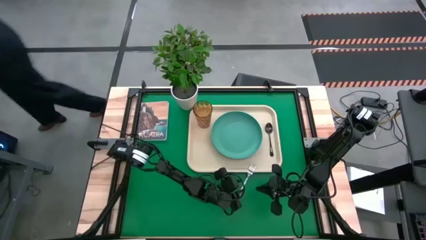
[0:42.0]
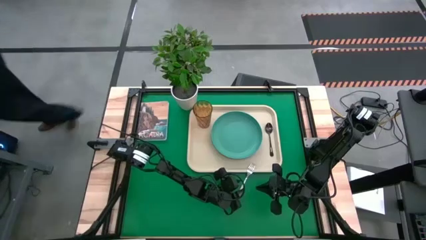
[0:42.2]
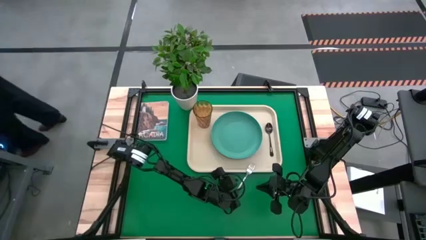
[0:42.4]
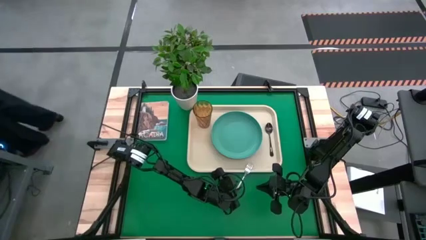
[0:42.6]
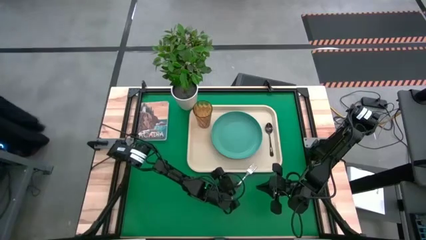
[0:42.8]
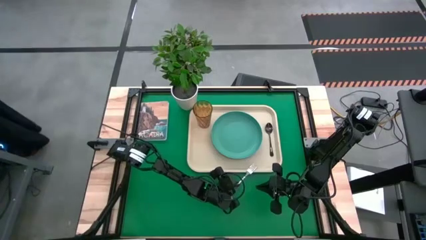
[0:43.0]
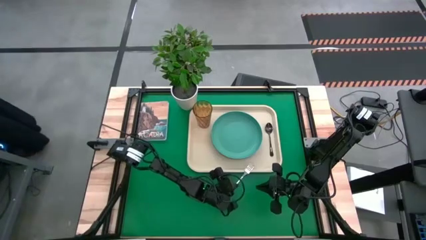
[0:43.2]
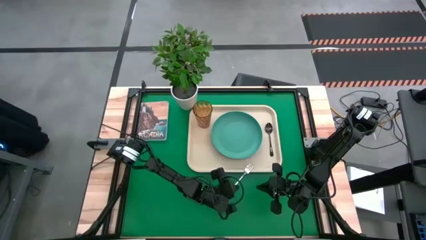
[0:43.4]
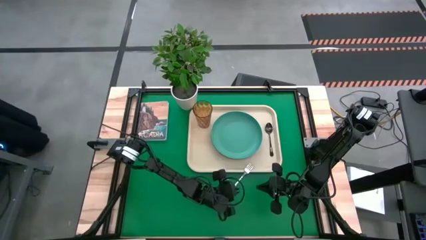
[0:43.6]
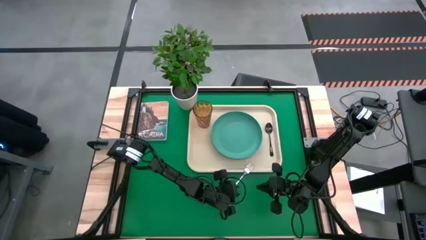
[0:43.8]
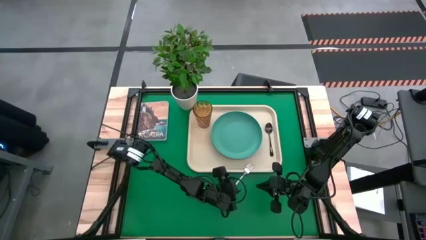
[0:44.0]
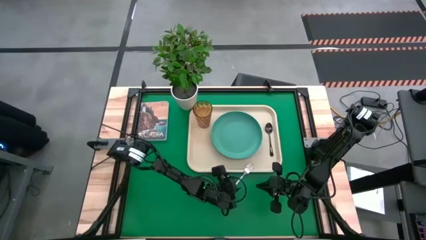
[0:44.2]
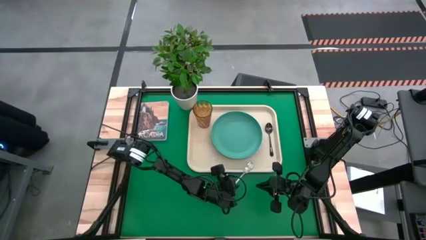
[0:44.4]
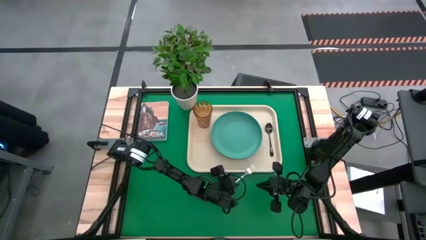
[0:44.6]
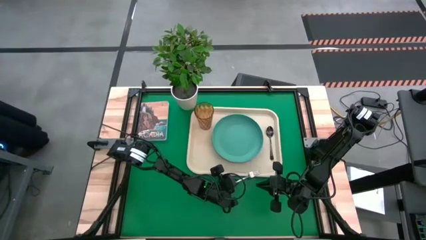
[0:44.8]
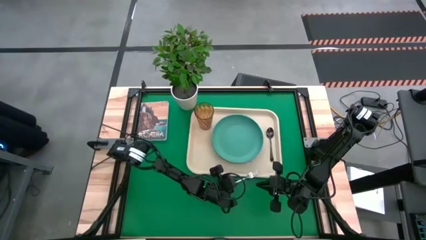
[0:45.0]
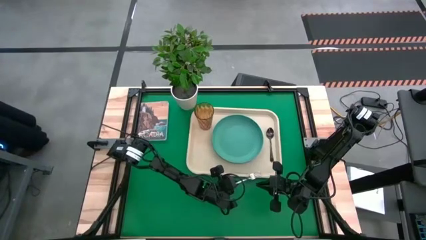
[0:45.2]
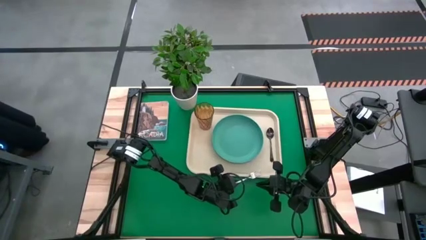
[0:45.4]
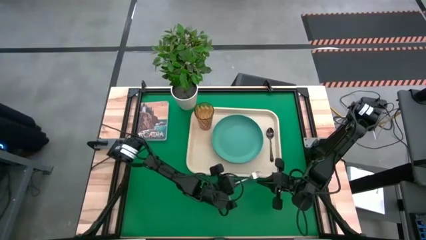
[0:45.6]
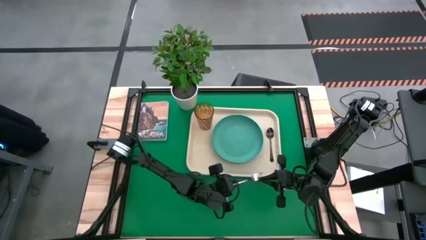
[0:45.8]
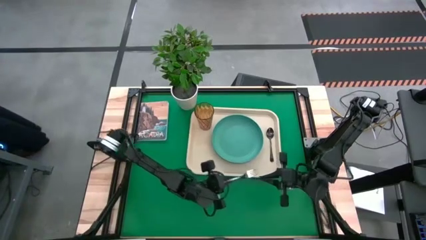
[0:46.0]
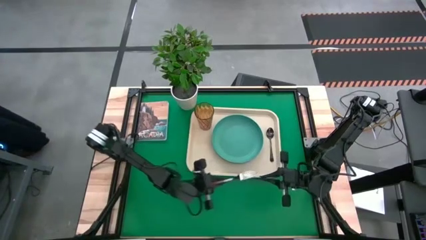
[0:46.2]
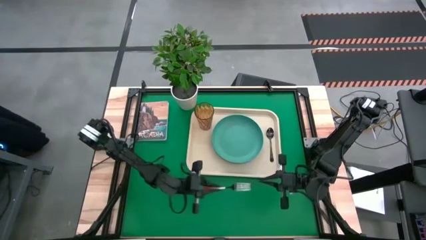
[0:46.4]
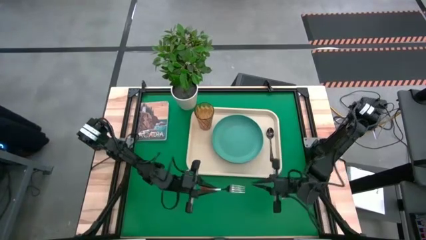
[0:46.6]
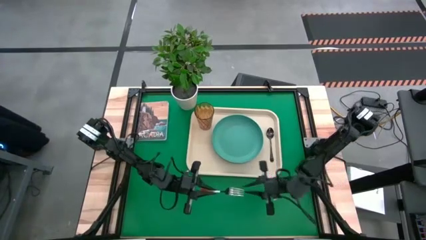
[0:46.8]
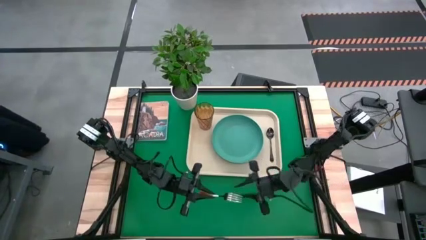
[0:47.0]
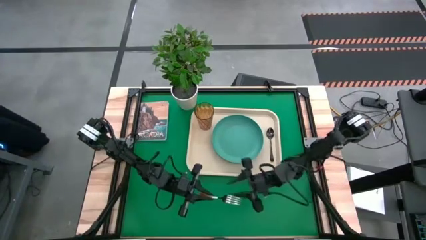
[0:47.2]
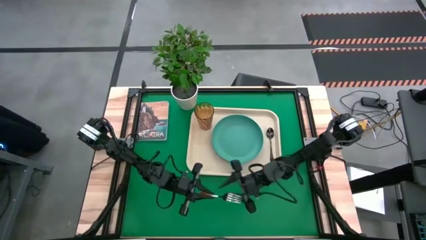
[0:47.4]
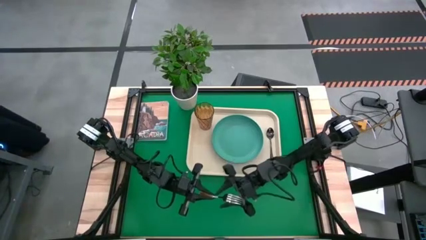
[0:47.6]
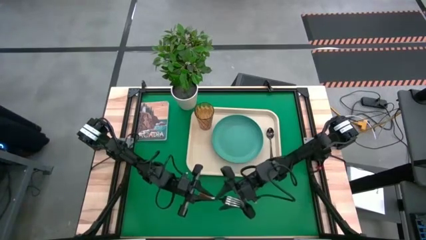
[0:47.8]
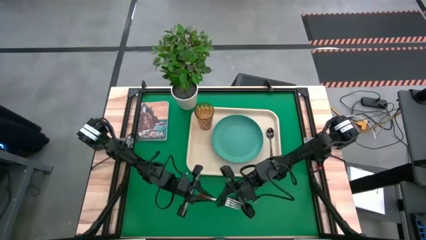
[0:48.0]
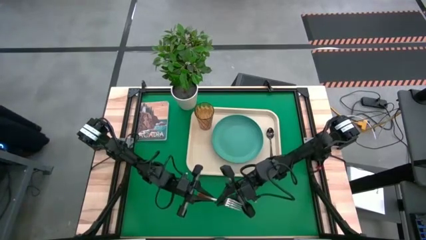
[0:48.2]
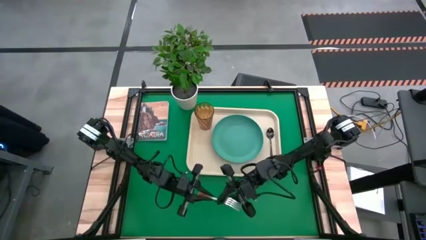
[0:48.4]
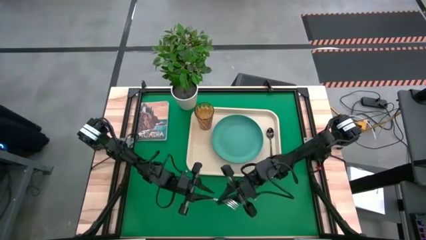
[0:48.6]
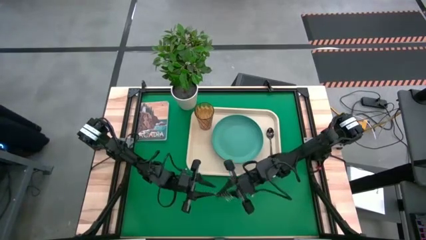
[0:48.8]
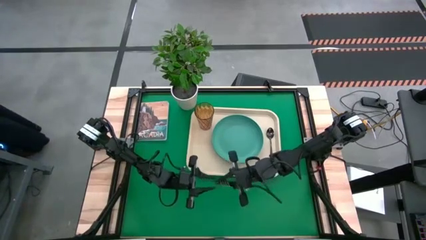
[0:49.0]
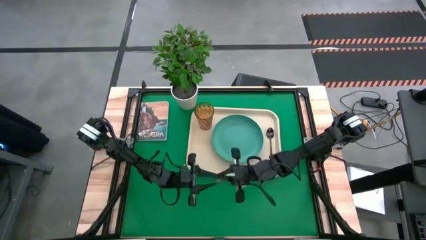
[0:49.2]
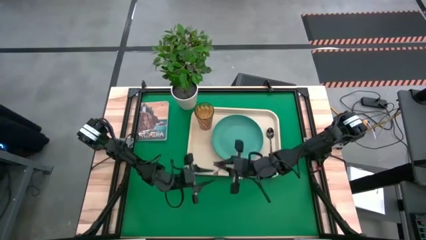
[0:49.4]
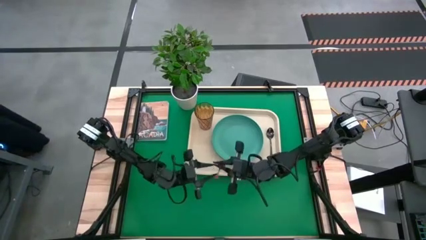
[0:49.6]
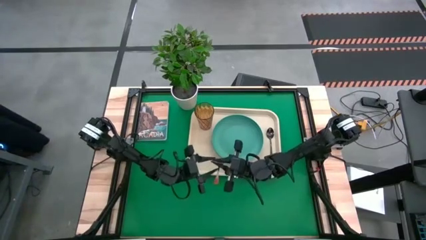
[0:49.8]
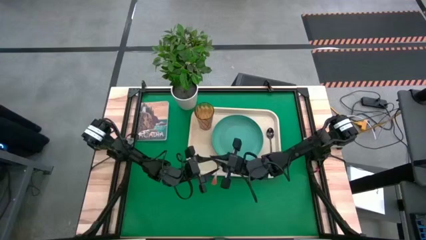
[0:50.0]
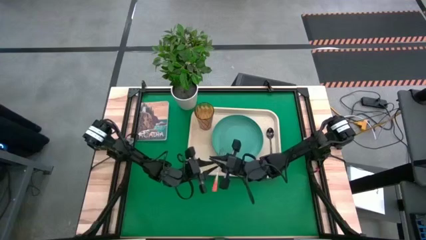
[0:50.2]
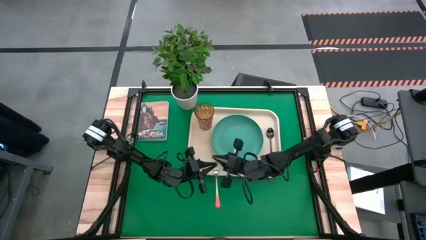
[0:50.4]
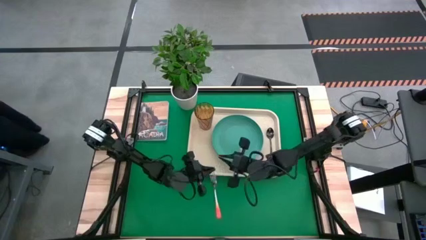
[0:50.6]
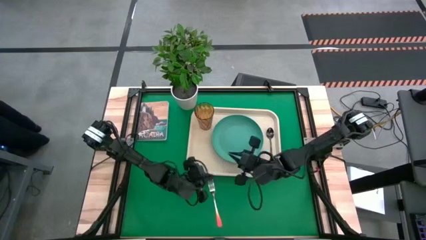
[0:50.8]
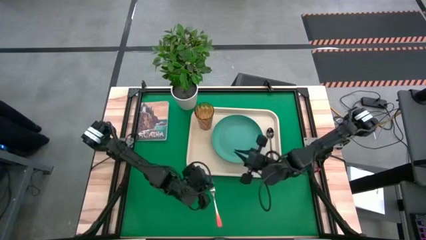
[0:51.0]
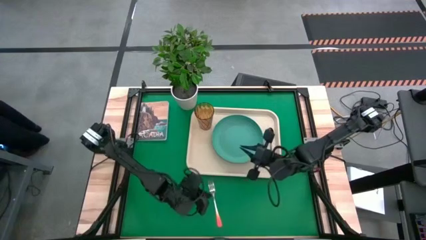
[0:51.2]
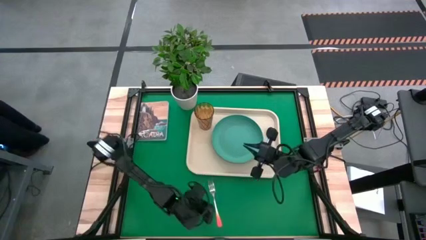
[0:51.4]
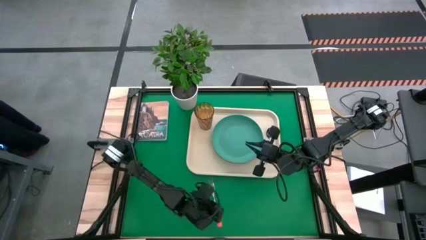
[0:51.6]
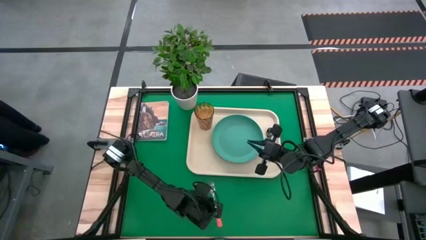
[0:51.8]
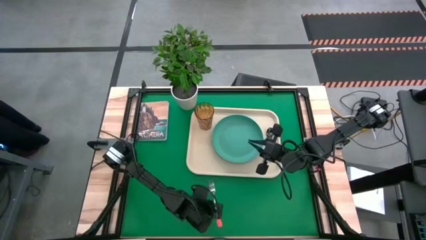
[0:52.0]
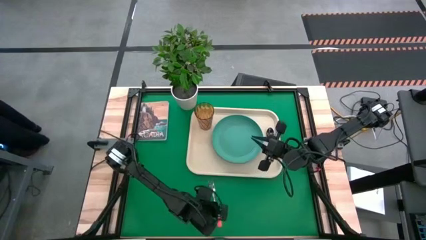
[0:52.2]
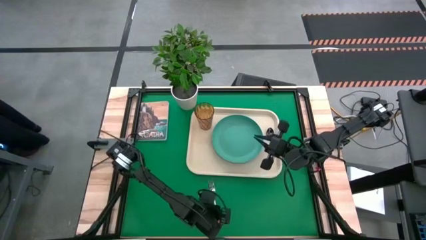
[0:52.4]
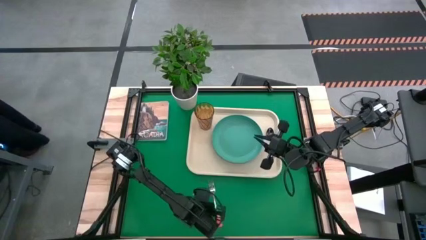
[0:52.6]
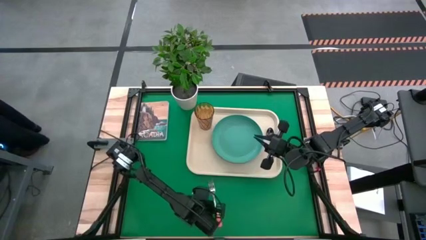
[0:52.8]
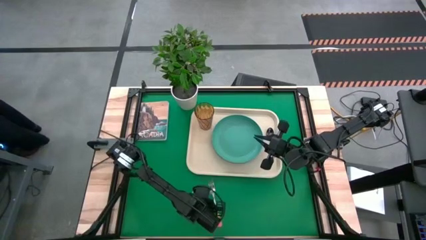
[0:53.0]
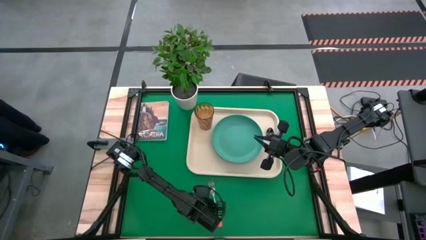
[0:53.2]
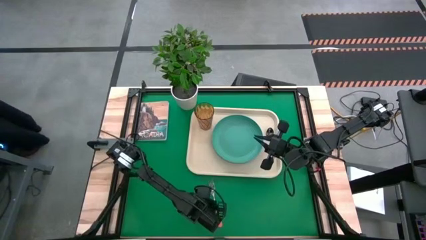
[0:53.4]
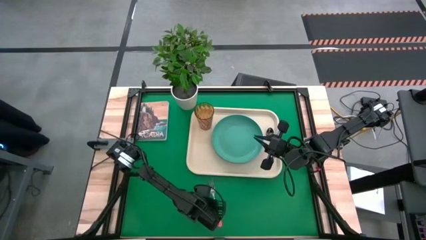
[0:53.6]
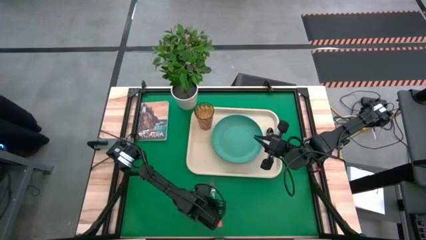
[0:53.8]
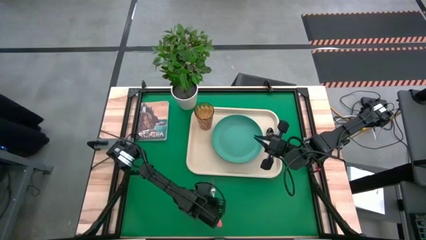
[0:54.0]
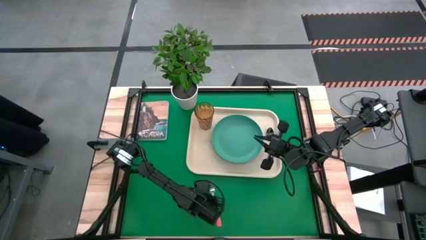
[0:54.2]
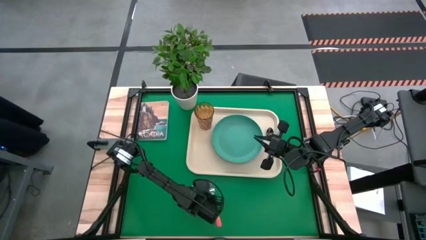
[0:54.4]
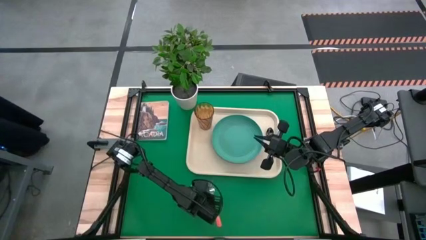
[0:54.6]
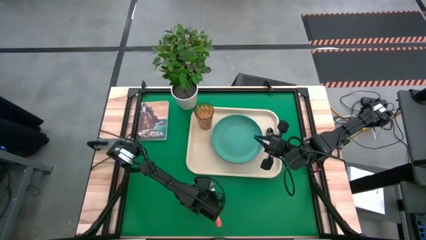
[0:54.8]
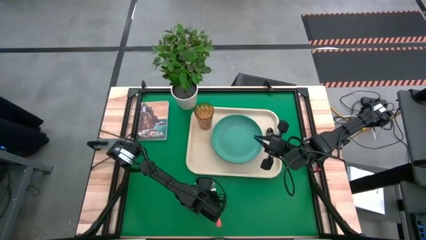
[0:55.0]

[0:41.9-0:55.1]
Task: Pick and place plate/cup/fork/spoon on tray
Put the orange fork on the white serving tray beside the blue plate

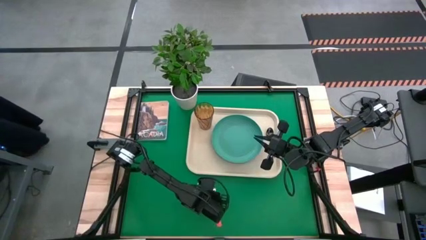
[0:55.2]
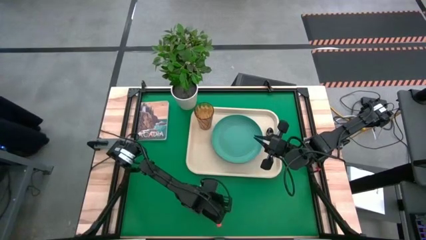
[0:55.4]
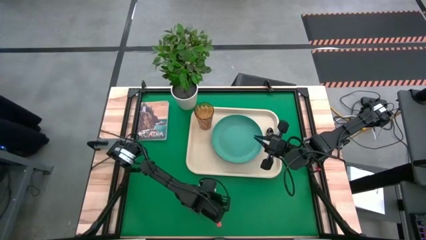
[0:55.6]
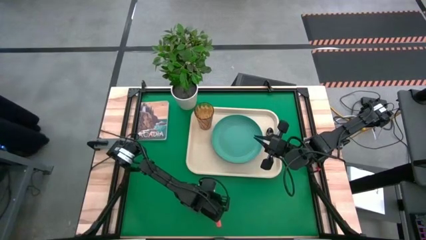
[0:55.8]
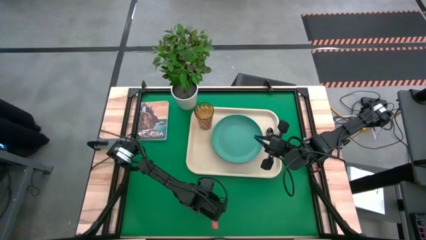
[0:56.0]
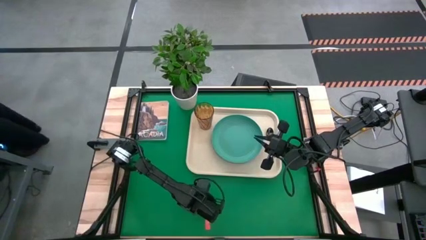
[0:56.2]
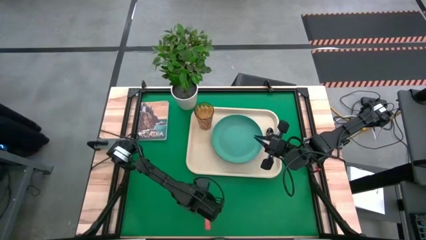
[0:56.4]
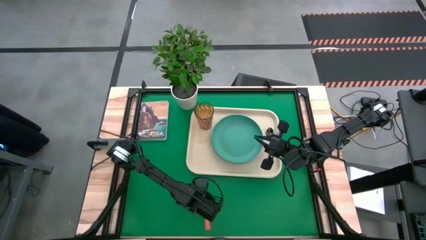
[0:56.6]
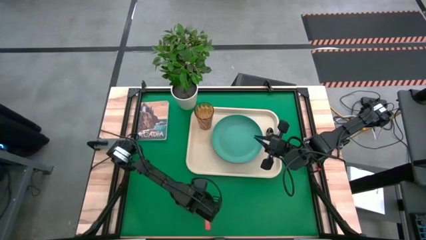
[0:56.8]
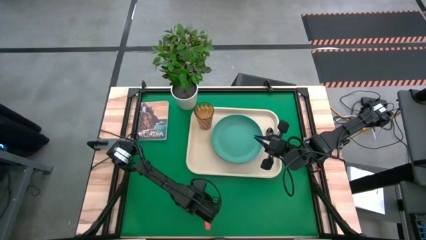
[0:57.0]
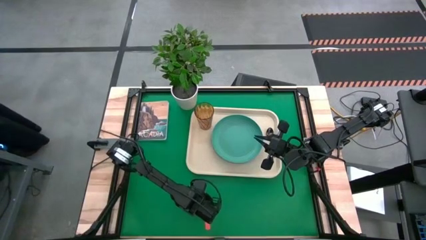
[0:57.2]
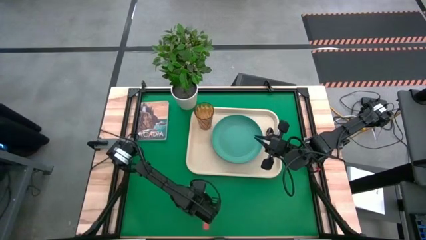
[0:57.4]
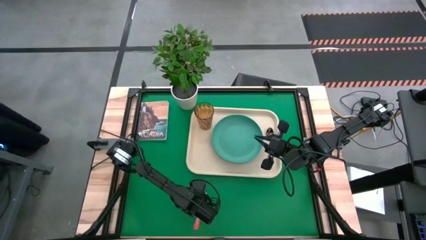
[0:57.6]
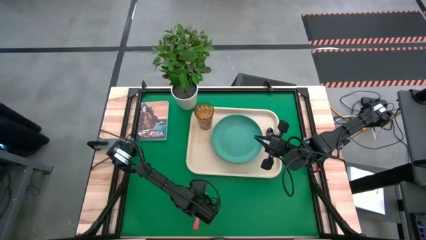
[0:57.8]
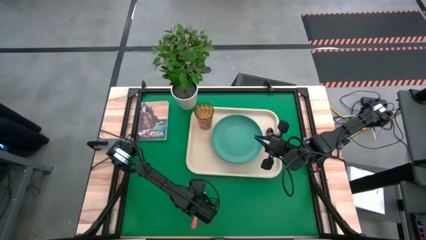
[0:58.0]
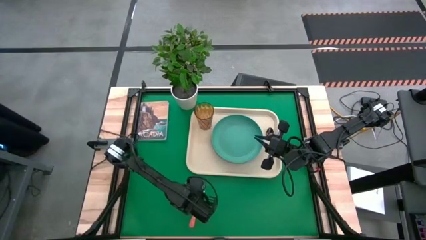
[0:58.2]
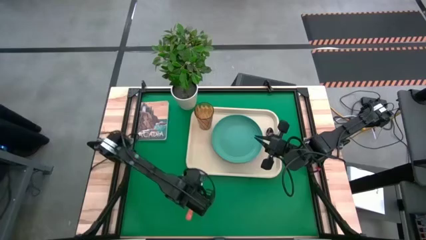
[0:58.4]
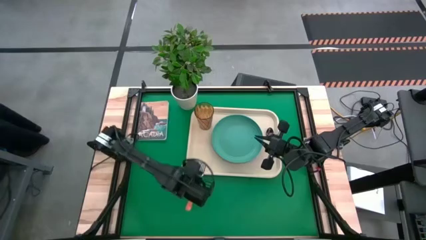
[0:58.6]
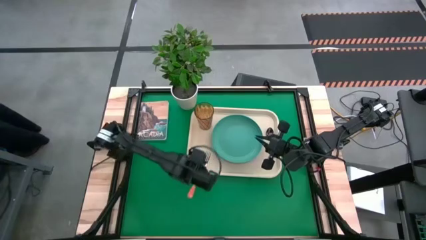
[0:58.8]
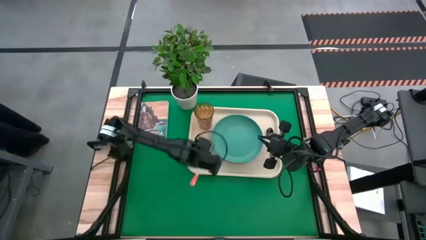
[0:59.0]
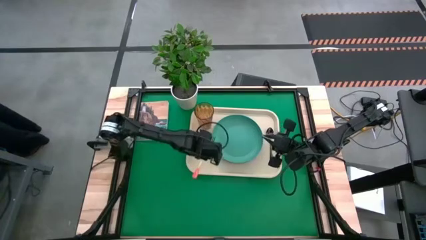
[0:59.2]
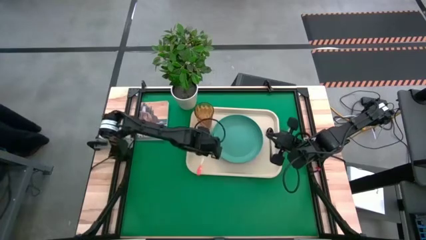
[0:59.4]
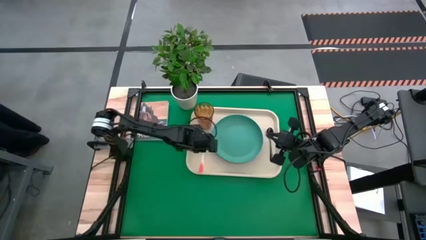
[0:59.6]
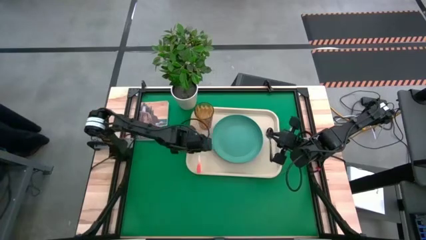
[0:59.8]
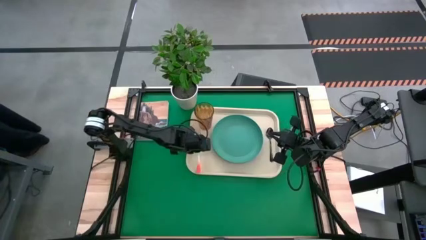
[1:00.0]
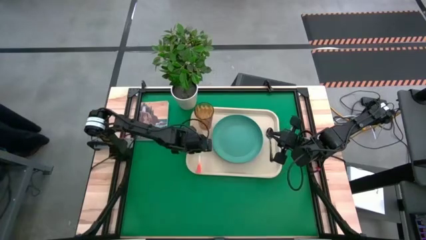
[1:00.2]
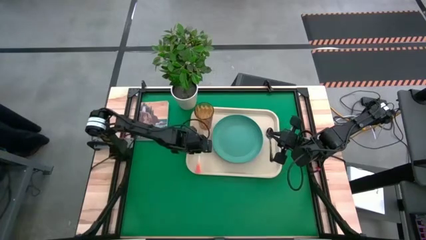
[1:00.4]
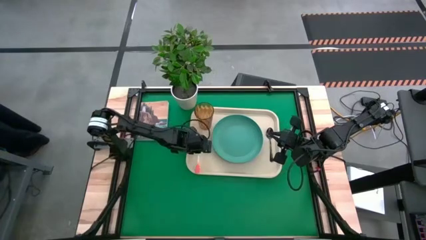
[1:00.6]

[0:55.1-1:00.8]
Put the orange fork on the white serving tray beside the blue plate
